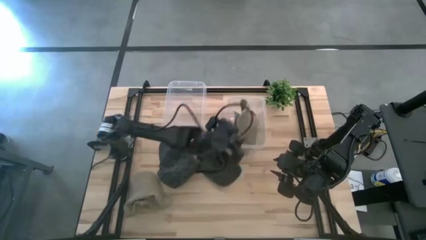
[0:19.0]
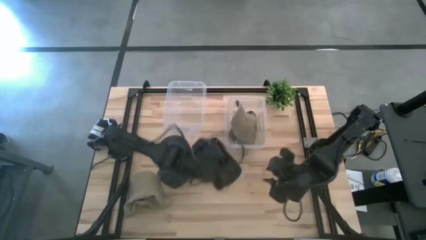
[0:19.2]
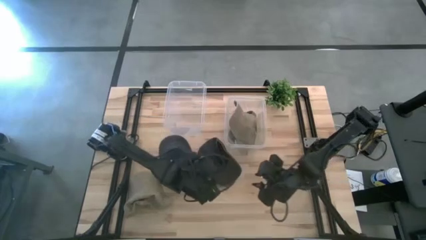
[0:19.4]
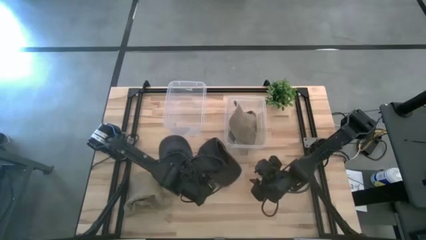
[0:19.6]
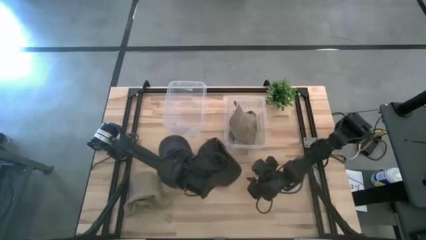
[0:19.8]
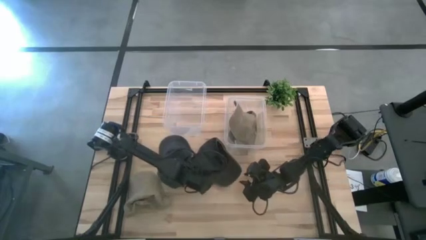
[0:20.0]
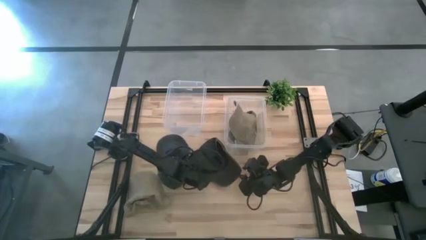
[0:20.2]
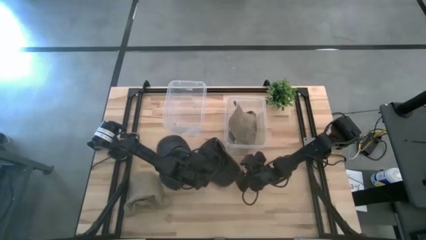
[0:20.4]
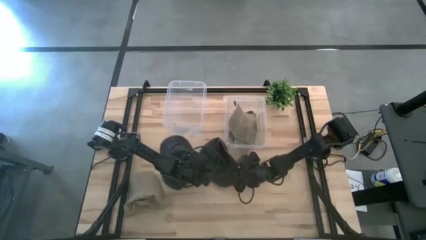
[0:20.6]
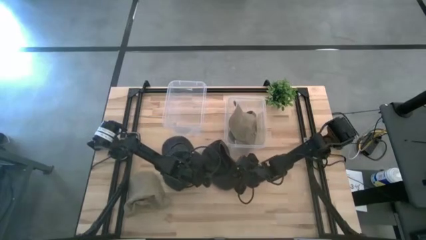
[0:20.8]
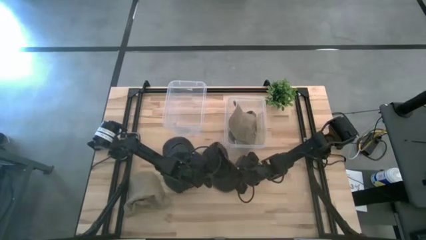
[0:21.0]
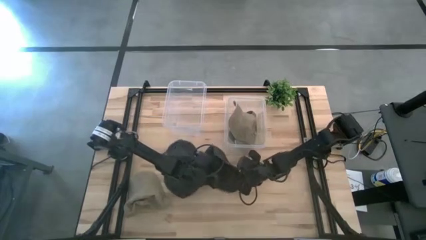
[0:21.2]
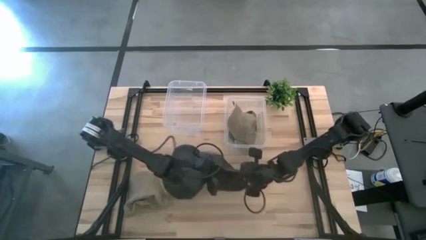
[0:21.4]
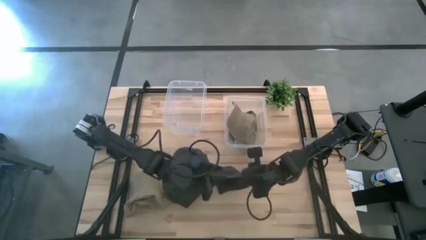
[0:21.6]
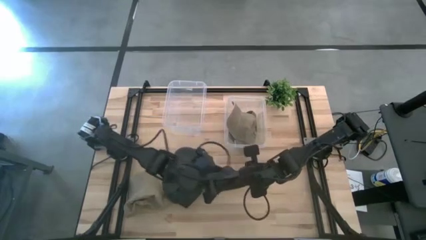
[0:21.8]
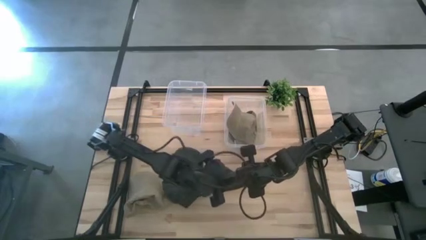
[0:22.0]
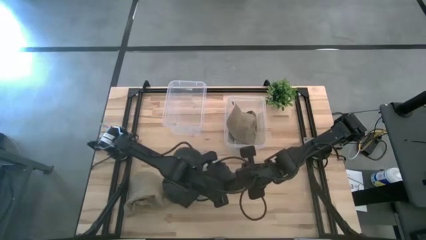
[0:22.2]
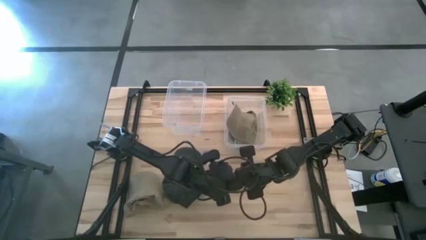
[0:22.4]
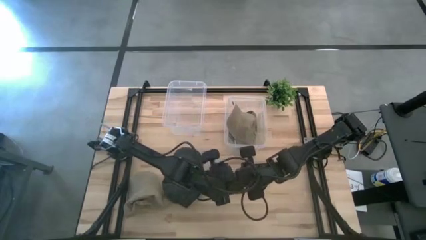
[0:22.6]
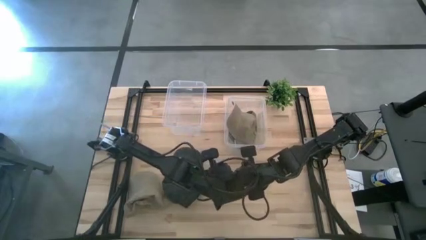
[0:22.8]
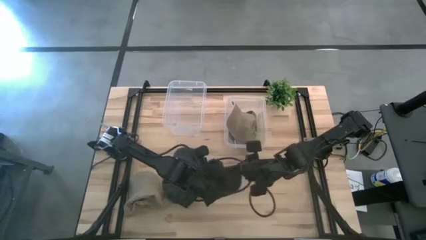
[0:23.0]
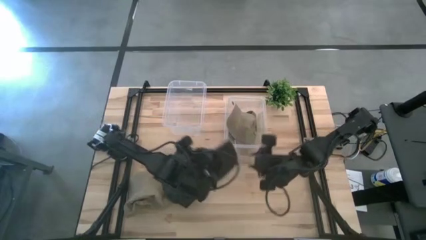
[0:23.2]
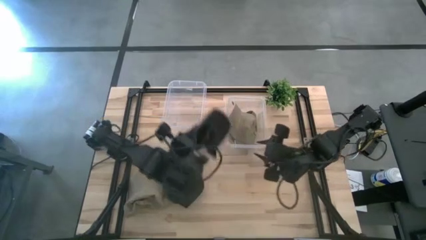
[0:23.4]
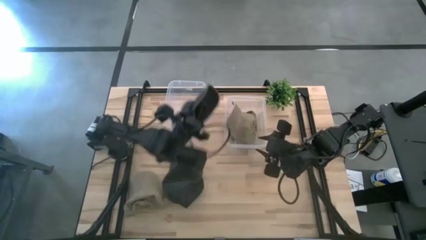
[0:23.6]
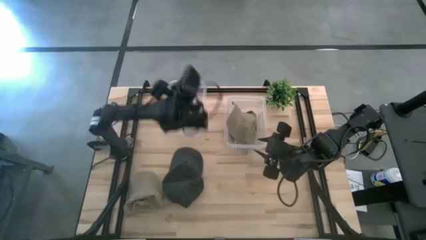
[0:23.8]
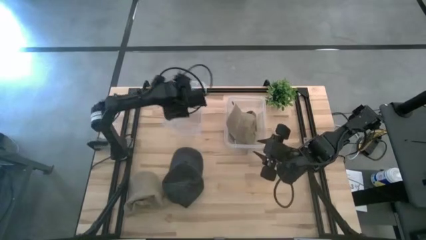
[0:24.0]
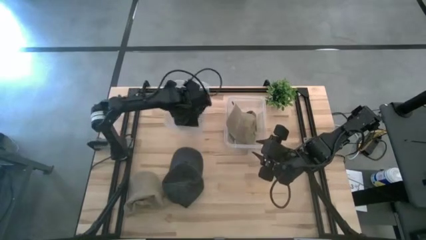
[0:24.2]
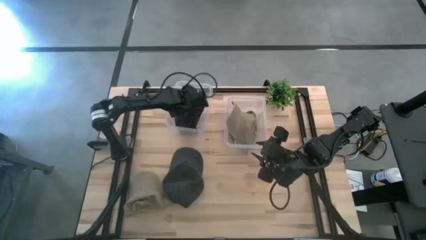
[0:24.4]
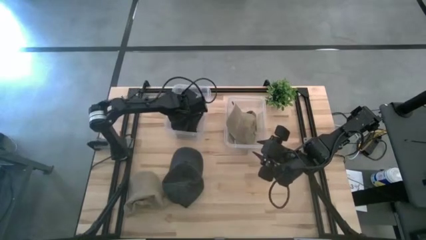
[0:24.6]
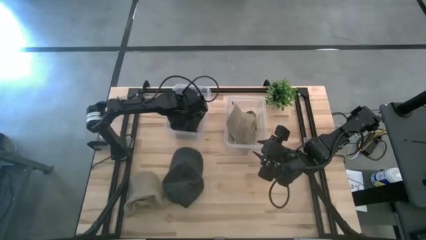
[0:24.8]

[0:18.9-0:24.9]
Task: Pick & Place hat
Put the right black cap into the left transparent bin

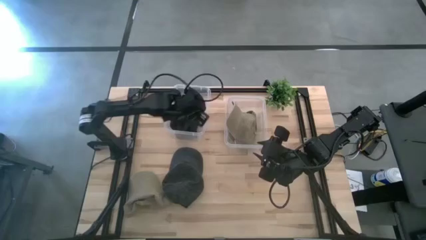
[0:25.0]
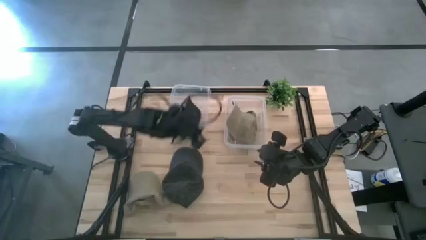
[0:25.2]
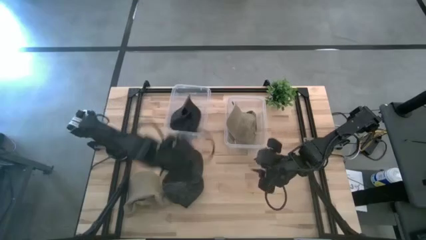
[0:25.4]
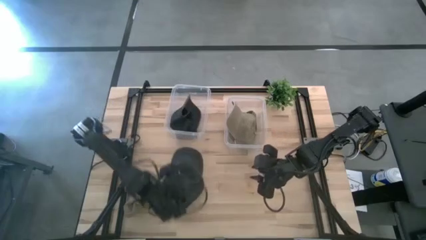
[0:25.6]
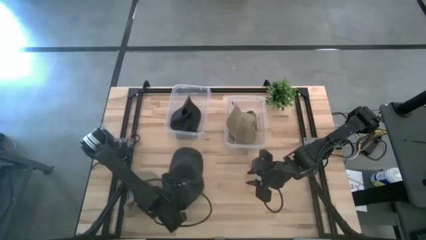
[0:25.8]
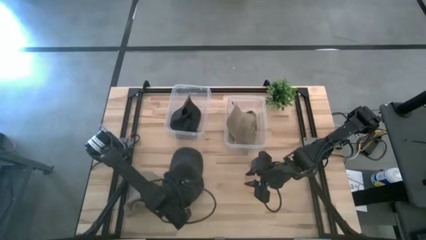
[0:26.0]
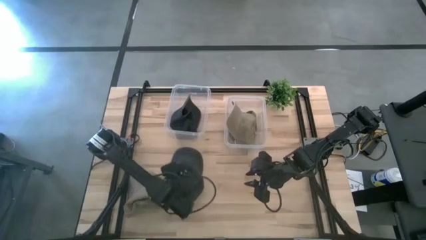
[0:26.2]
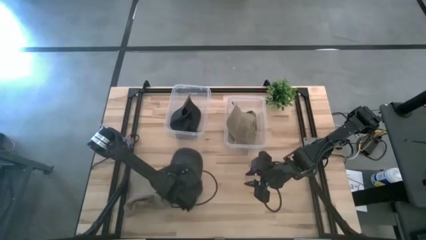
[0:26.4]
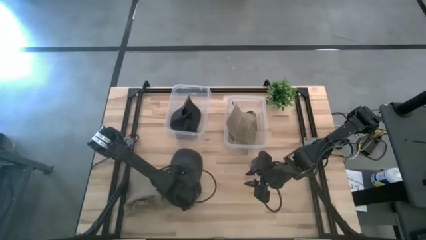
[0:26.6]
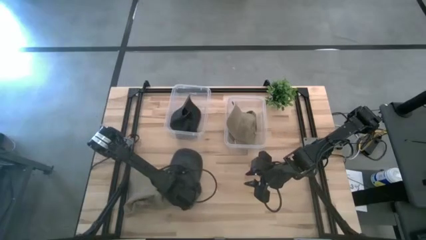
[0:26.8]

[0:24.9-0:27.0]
Put the black cap into the left transparent bin

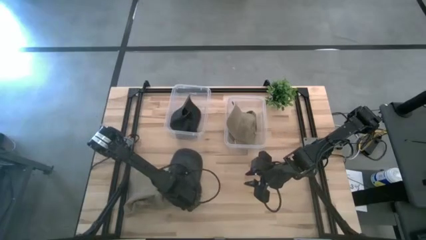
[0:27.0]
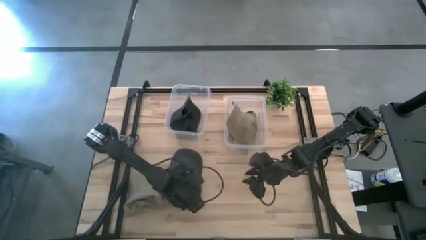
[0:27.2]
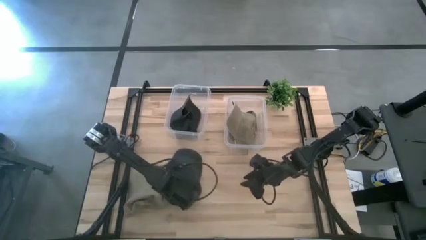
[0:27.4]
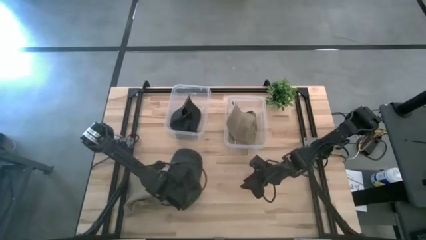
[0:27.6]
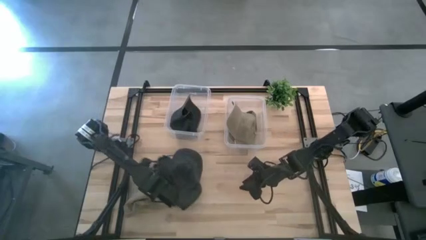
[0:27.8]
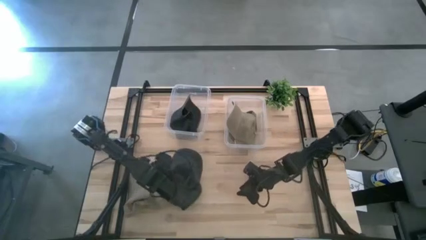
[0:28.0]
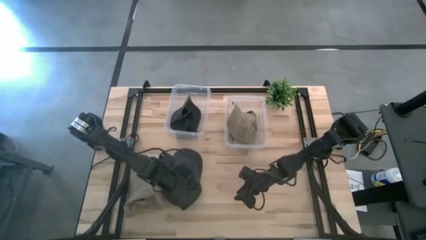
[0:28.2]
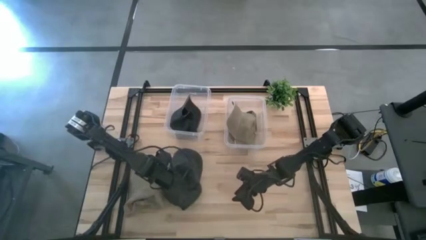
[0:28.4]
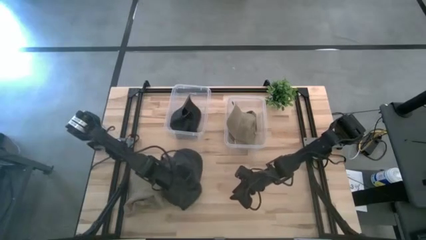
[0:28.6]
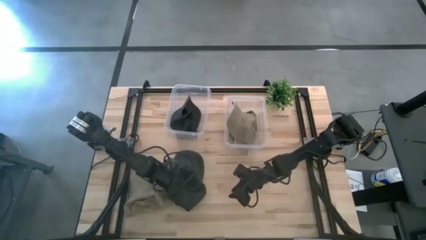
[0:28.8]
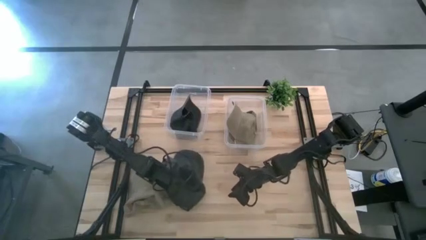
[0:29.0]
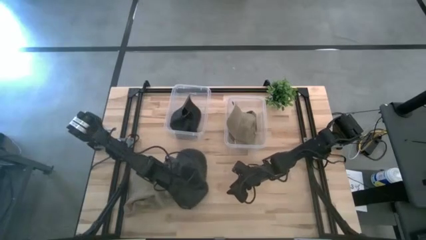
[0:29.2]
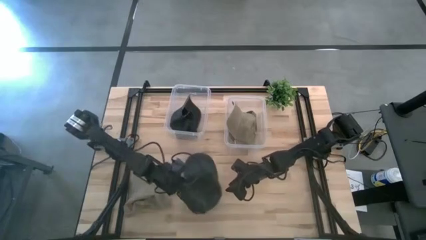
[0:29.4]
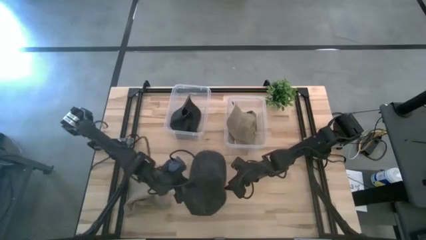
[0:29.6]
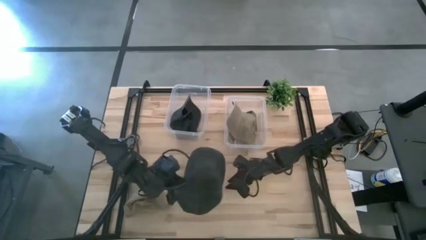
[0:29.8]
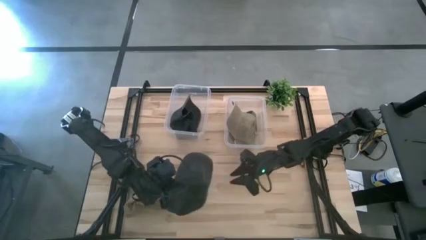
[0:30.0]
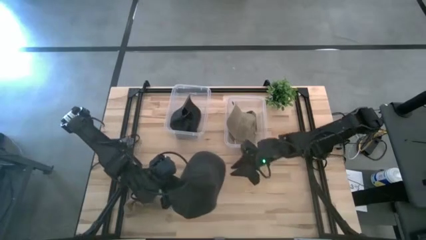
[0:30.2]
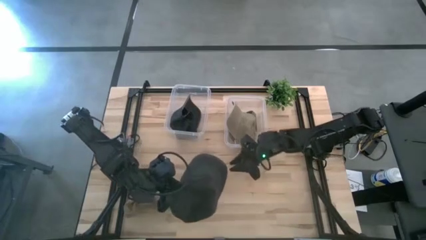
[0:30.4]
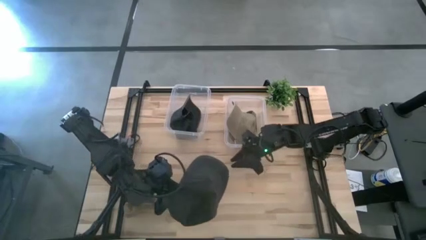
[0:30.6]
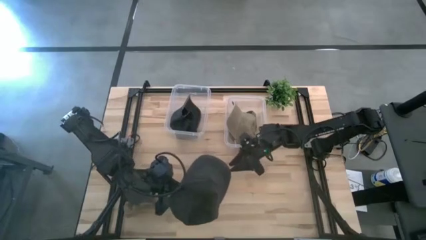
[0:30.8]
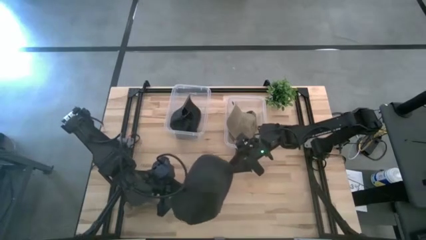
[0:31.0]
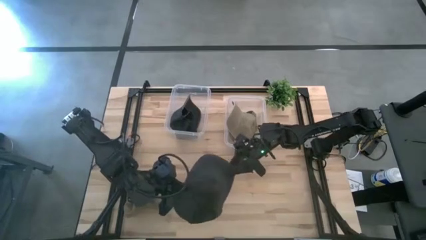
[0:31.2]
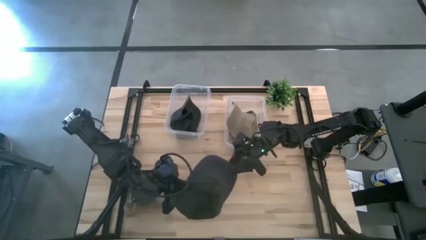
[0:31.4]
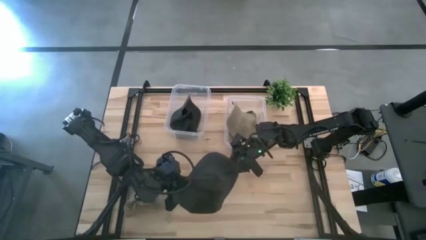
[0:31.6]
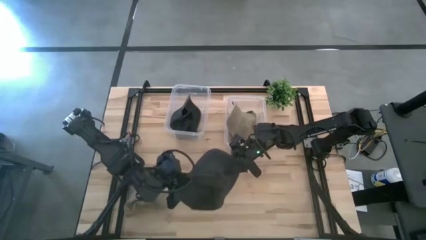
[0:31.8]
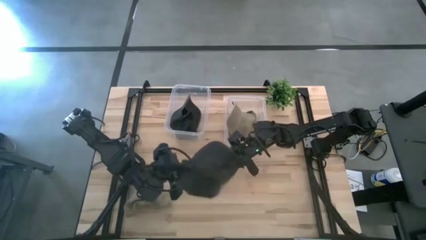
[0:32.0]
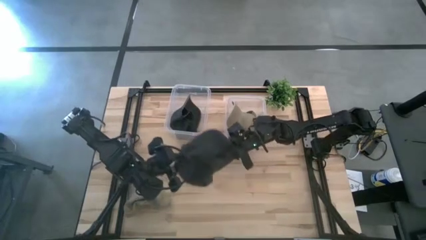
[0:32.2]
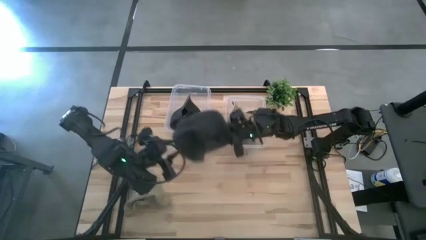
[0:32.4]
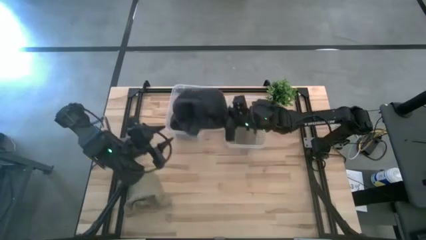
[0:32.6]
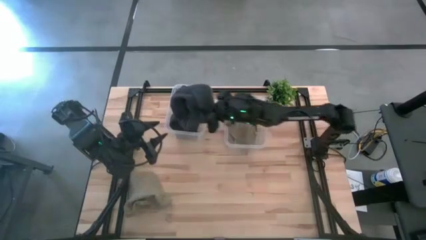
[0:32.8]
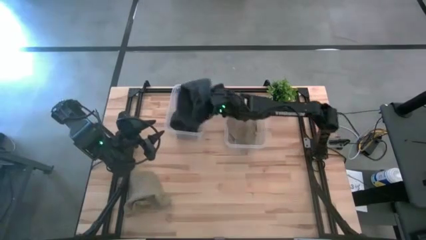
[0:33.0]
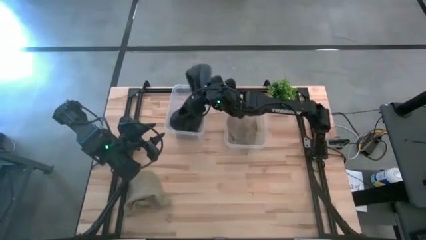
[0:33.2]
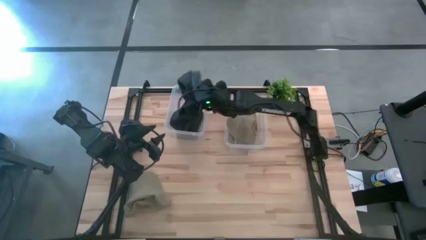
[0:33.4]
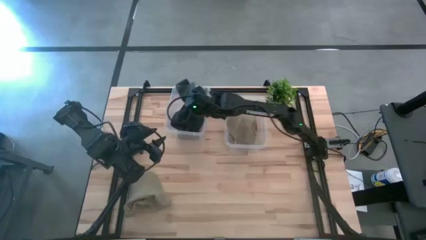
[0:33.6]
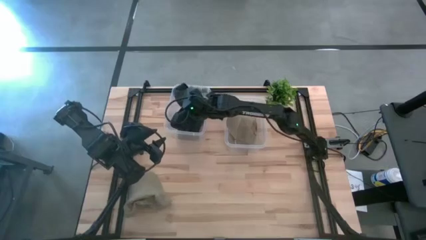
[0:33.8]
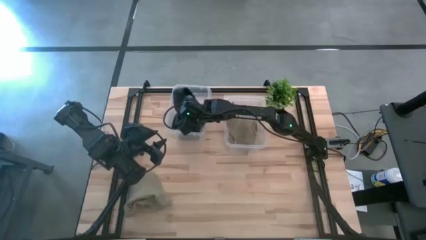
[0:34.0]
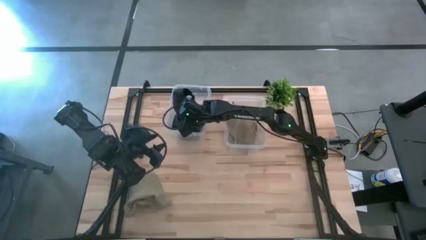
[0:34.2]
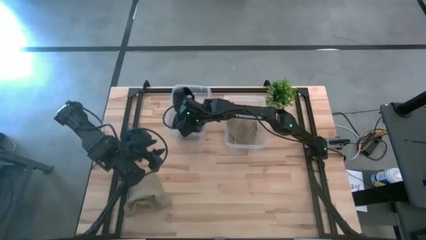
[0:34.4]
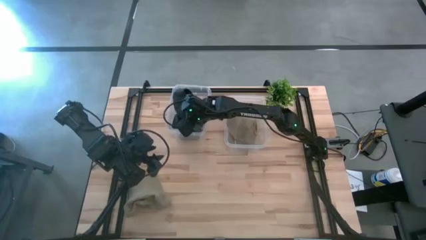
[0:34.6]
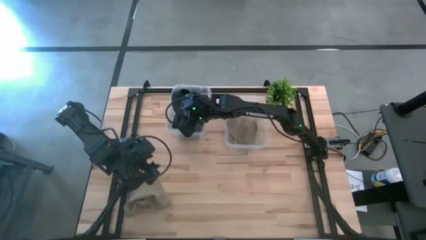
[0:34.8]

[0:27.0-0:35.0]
Put the black cap into the left transparent bin
